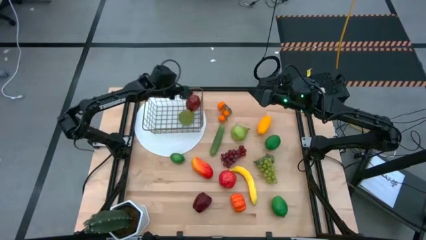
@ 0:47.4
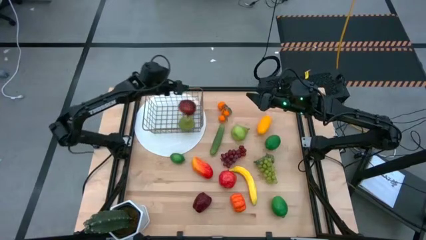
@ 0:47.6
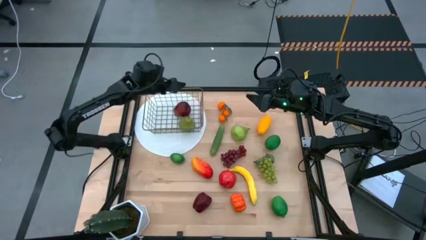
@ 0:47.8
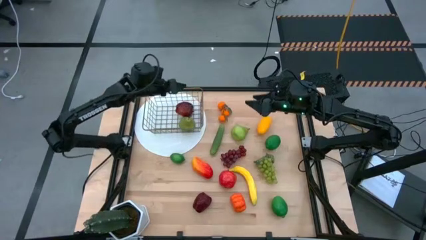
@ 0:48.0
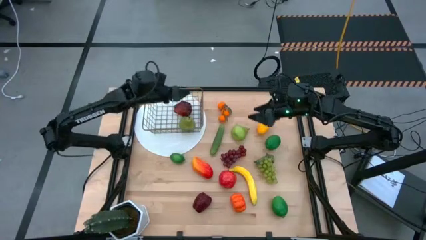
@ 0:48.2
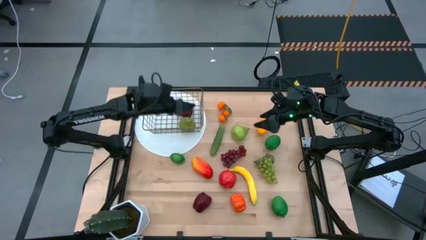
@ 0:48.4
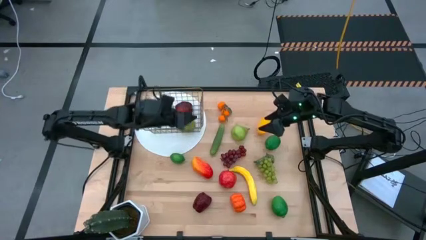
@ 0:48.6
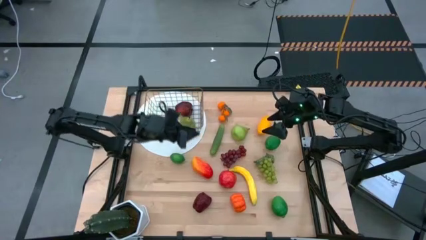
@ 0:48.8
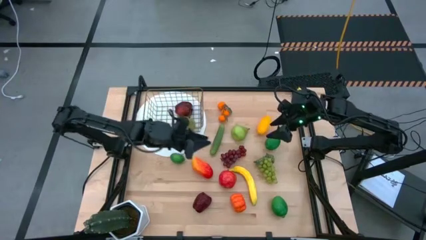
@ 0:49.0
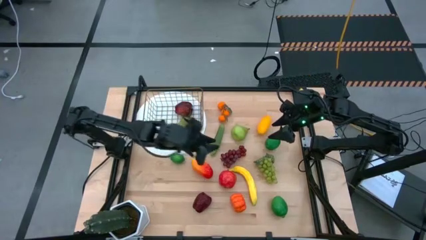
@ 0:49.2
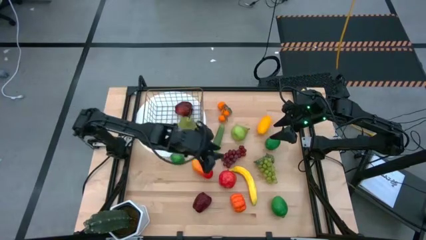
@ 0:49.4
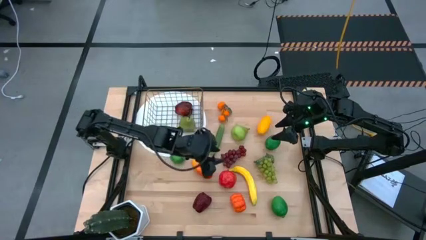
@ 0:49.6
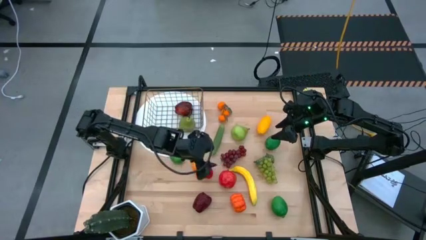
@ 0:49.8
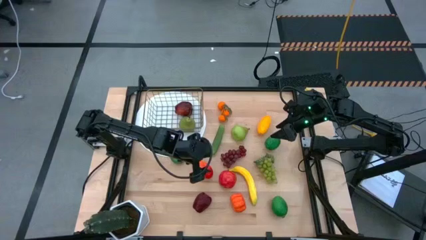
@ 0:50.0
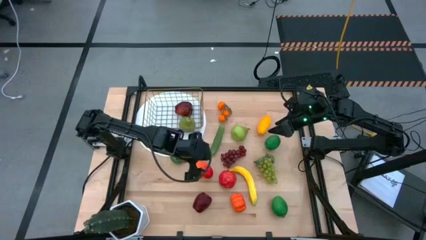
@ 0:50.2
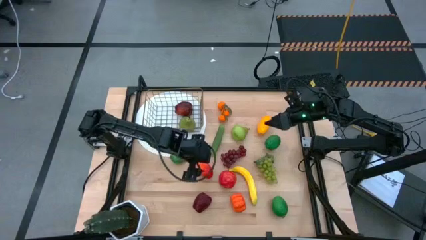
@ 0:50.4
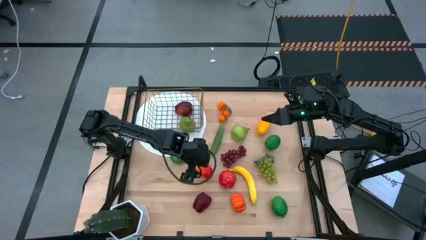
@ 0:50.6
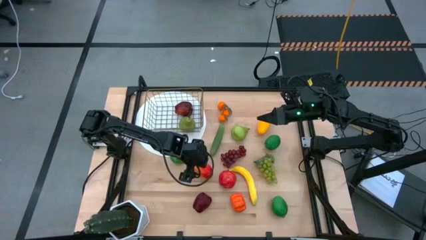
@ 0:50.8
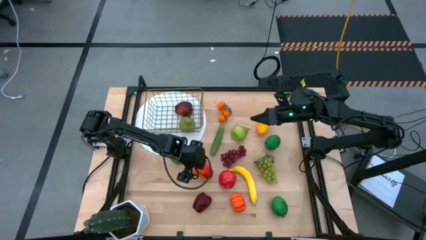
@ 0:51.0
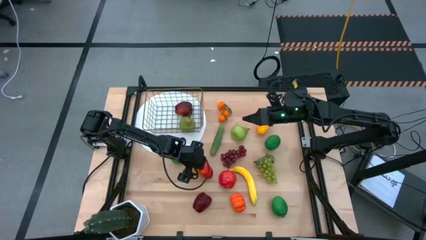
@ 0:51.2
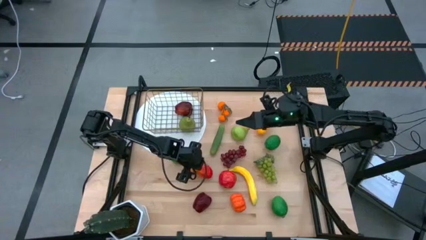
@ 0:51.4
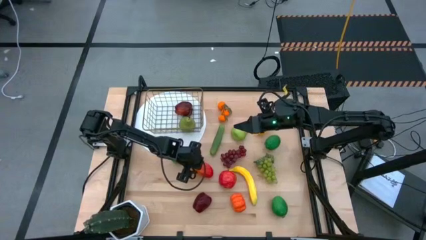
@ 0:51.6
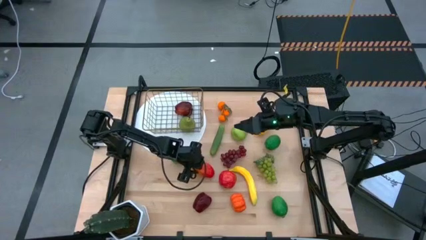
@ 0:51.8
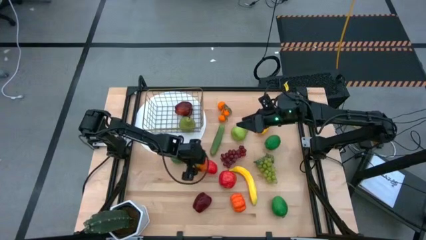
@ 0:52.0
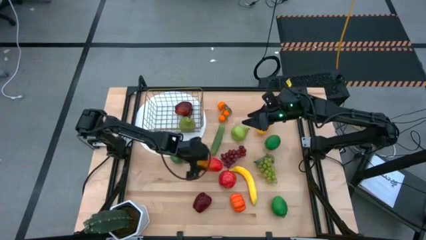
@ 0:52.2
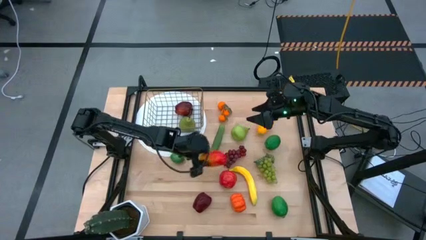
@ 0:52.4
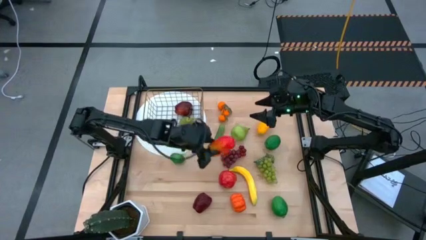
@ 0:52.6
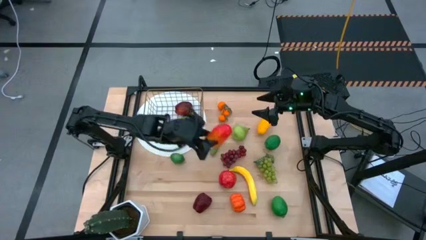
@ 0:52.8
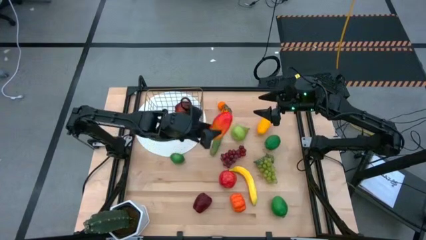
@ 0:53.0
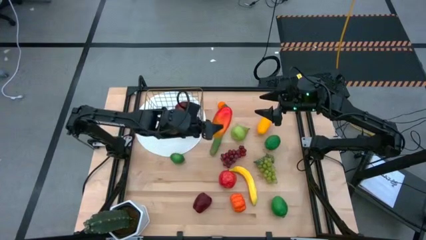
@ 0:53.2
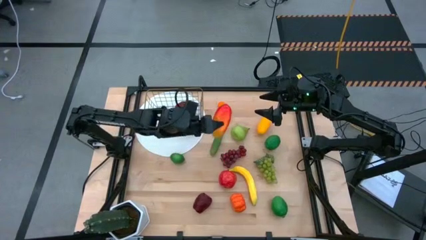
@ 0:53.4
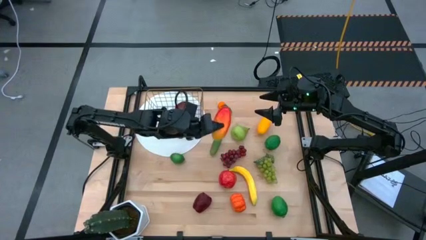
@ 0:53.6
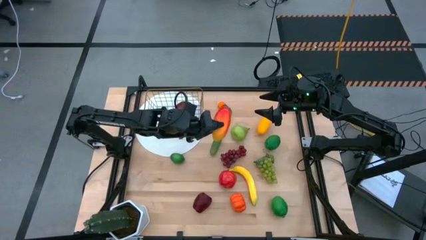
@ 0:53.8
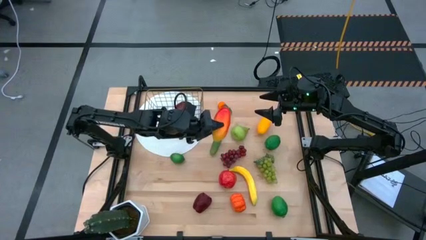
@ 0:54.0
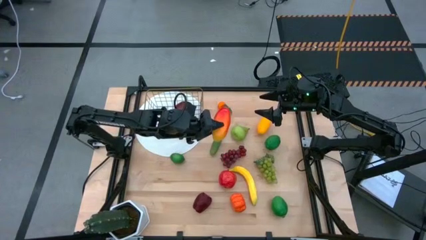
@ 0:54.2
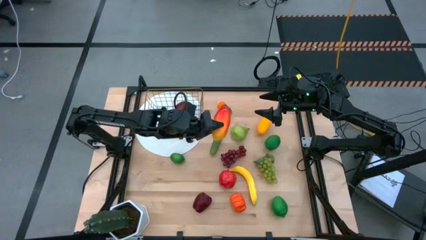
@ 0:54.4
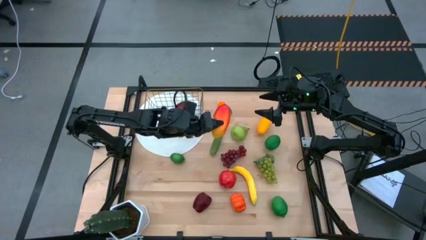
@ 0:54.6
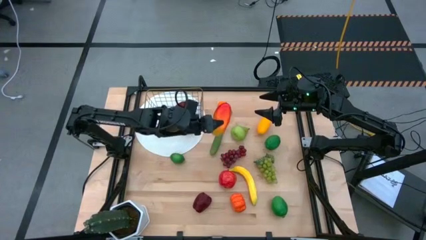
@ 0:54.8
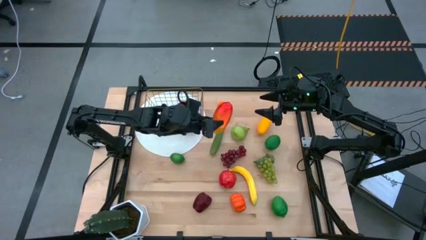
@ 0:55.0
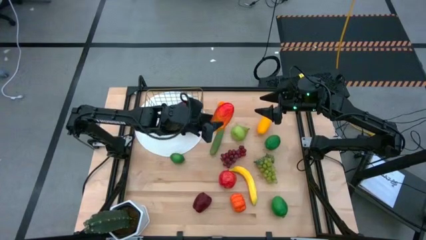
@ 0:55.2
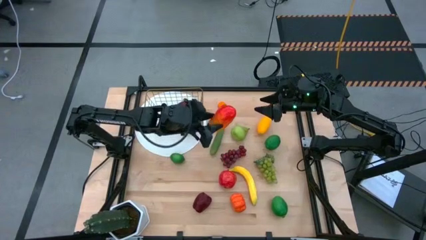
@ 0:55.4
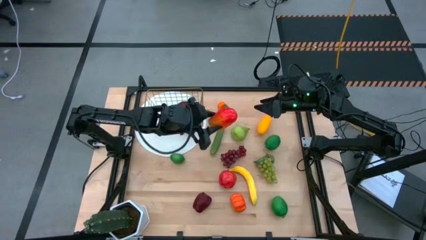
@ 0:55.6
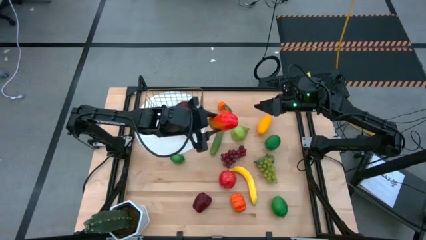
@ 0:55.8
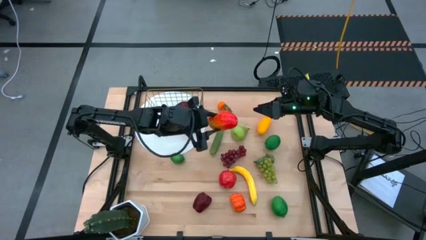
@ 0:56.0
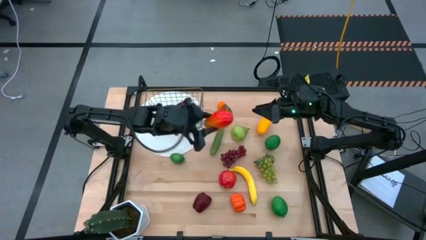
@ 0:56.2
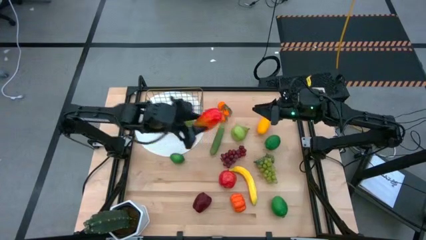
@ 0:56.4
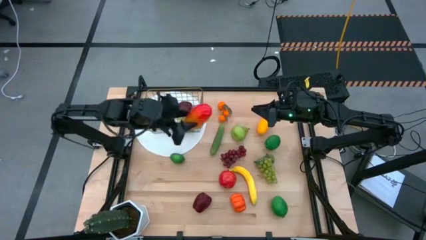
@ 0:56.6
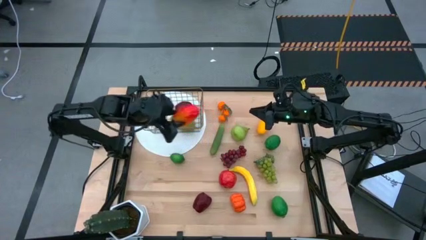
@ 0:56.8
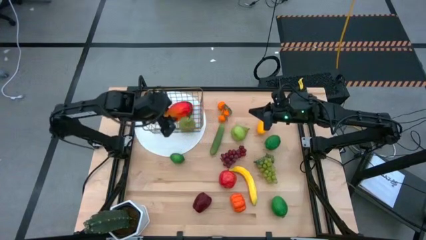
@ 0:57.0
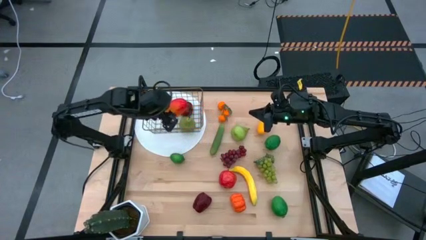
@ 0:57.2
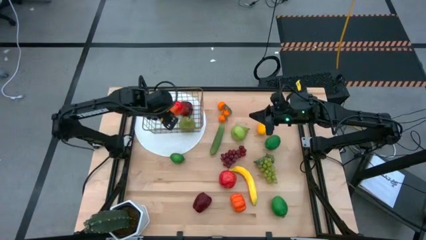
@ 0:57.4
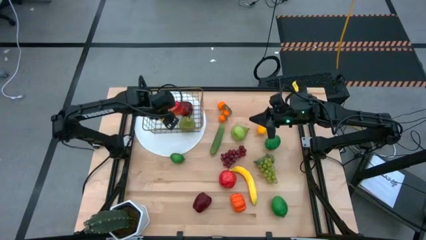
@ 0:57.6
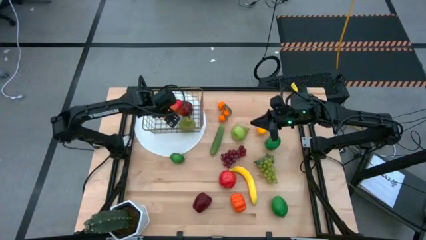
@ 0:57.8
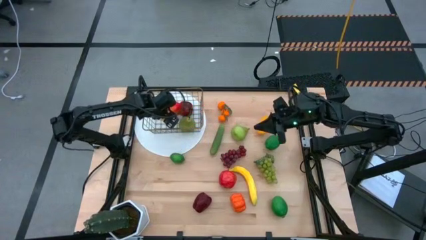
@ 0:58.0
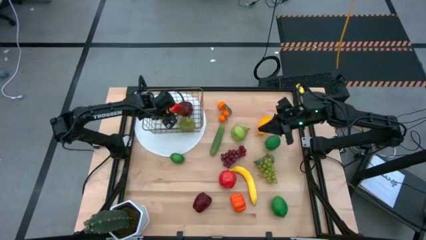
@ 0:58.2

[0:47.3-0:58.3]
Task: Build produce basket
Put the bottom mango into the wired basket

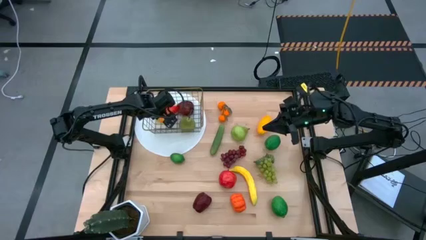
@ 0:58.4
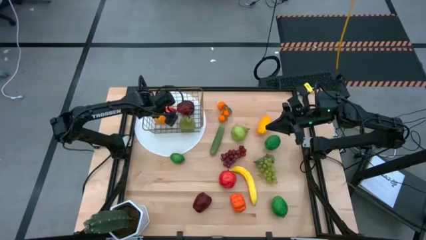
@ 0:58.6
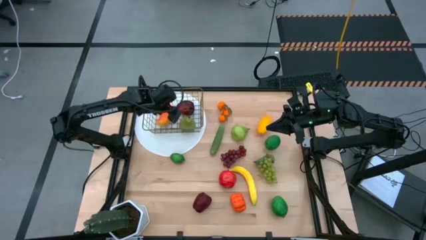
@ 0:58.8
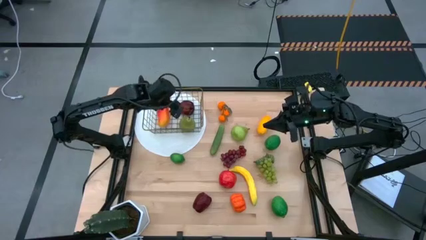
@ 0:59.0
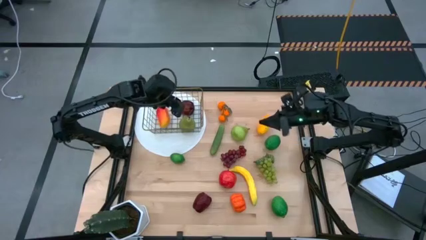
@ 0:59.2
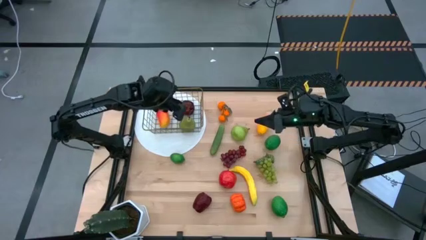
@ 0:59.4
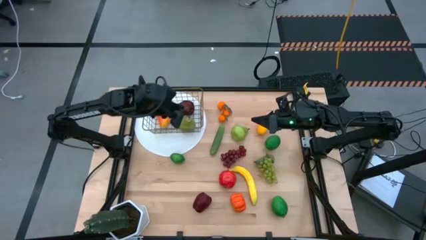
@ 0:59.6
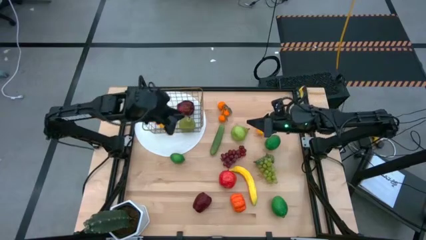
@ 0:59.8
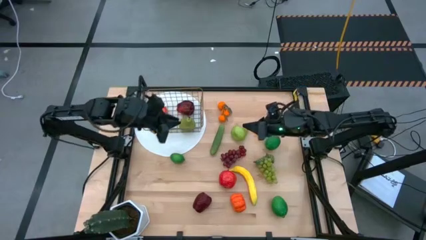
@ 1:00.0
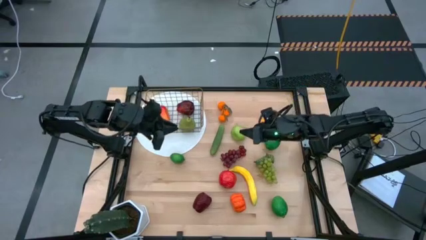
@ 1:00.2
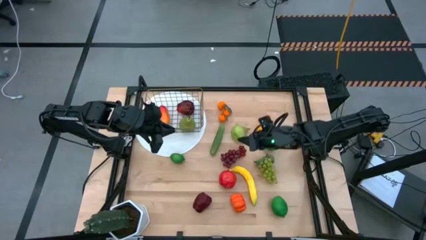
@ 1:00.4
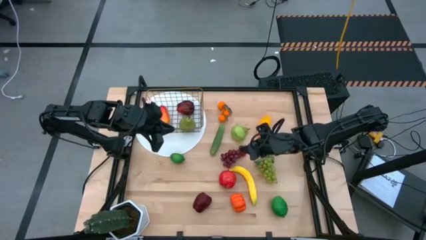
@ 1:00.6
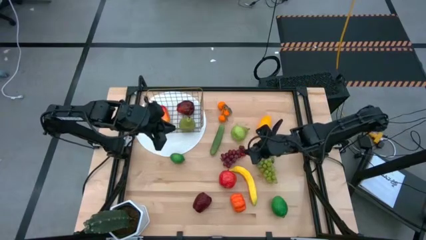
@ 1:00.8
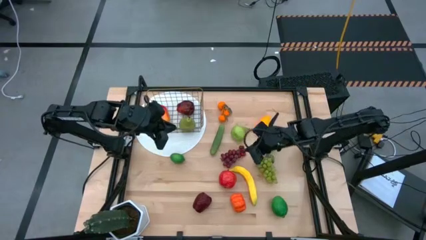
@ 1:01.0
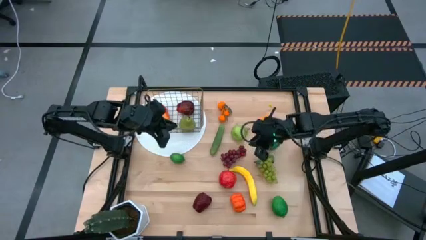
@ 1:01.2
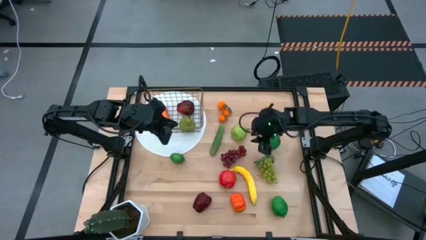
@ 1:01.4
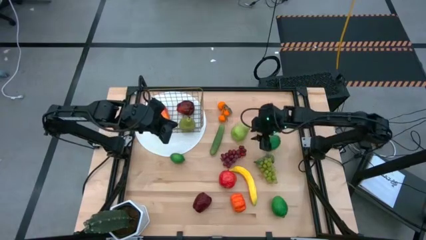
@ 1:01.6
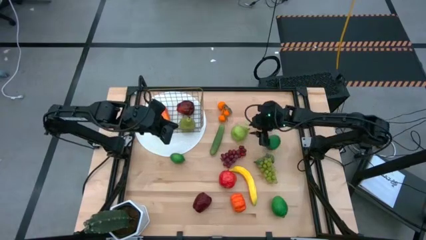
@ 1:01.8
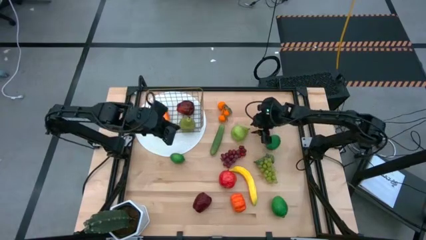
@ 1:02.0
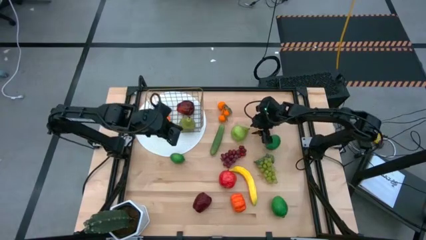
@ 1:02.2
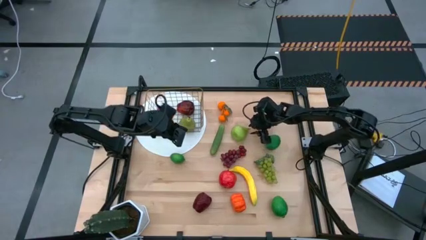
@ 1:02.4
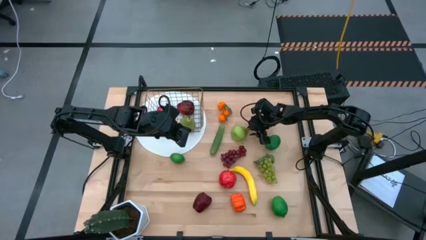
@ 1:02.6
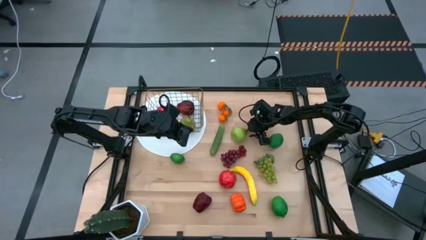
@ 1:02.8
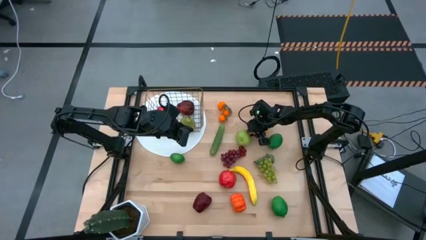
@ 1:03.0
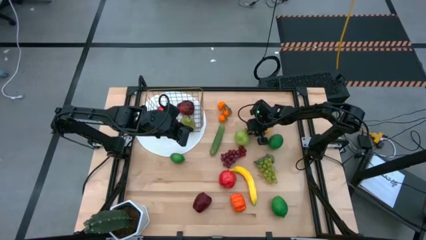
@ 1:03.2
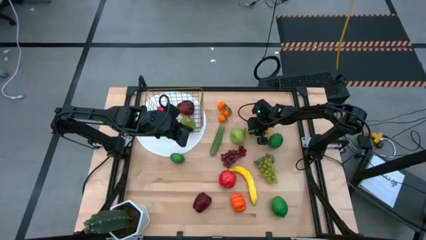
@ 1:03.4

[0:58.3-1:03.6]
Put the pear into the wired basket
